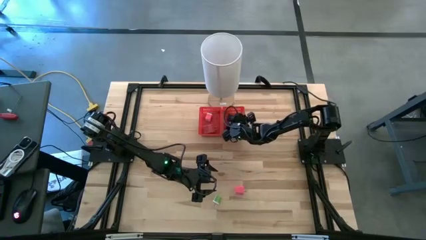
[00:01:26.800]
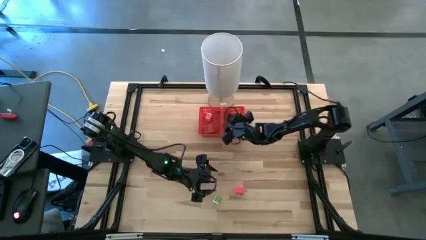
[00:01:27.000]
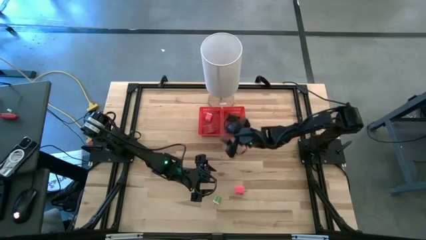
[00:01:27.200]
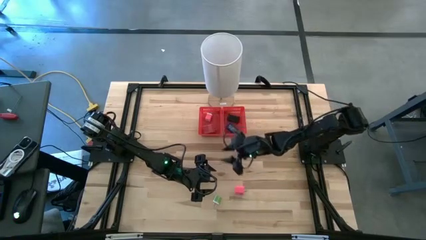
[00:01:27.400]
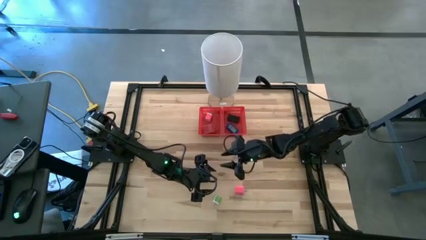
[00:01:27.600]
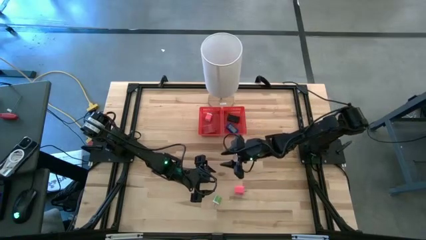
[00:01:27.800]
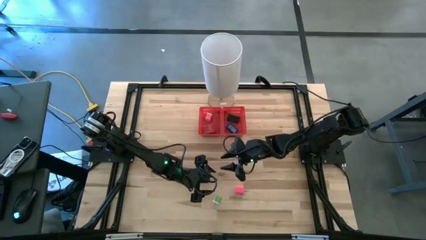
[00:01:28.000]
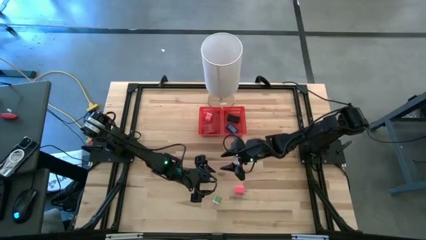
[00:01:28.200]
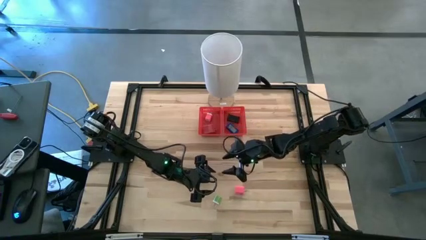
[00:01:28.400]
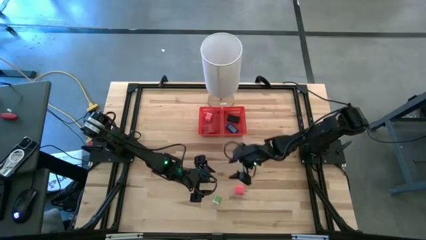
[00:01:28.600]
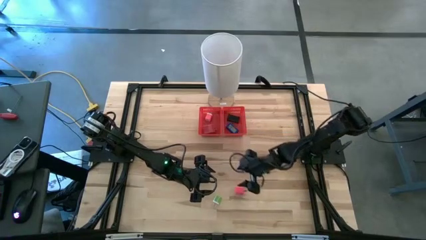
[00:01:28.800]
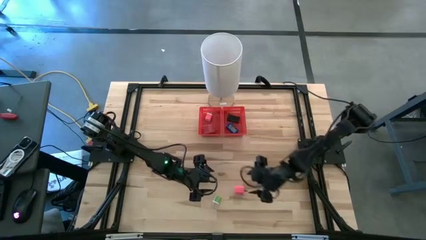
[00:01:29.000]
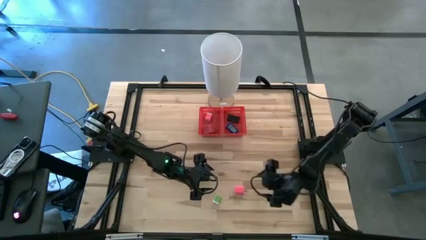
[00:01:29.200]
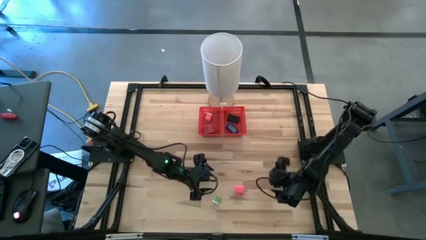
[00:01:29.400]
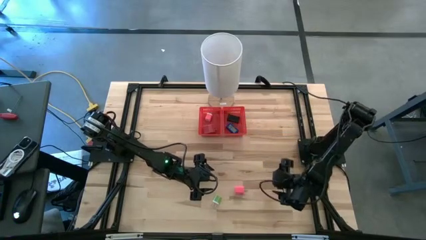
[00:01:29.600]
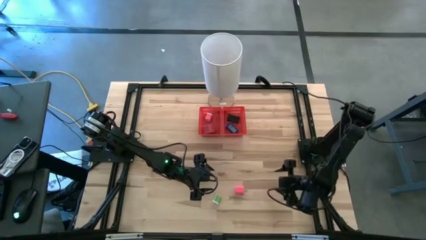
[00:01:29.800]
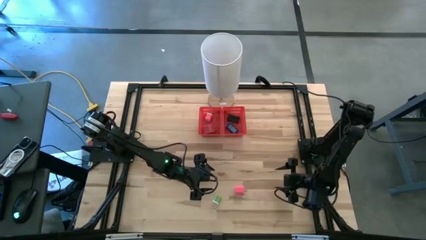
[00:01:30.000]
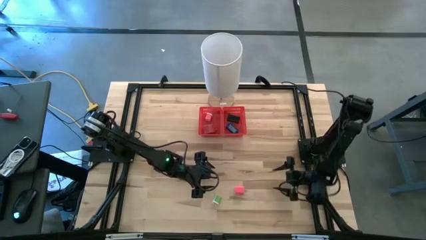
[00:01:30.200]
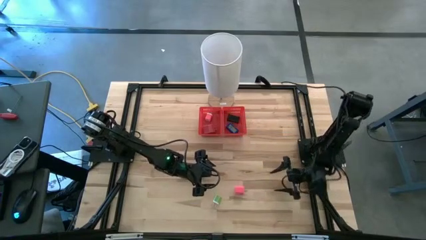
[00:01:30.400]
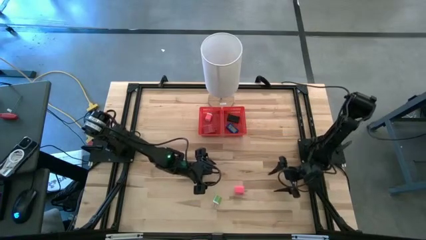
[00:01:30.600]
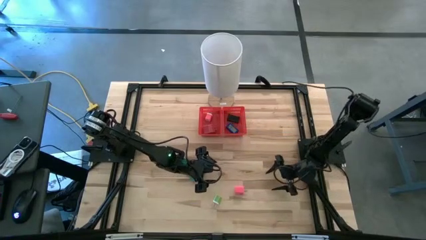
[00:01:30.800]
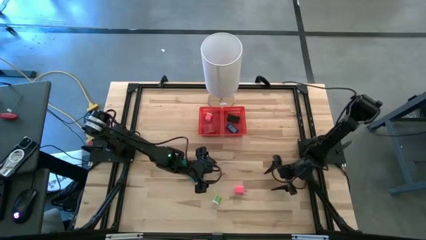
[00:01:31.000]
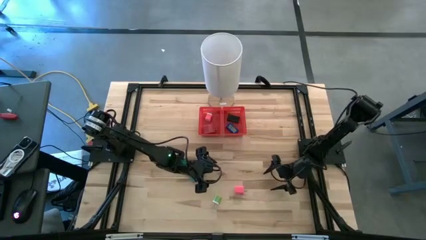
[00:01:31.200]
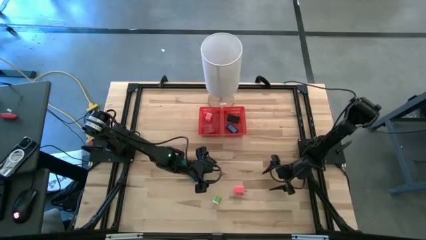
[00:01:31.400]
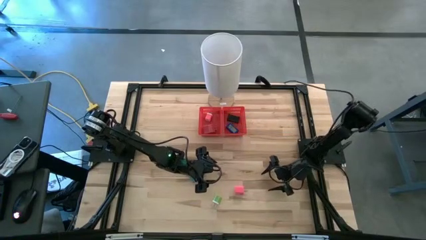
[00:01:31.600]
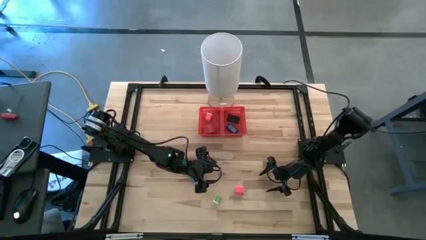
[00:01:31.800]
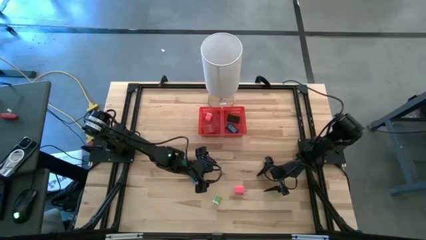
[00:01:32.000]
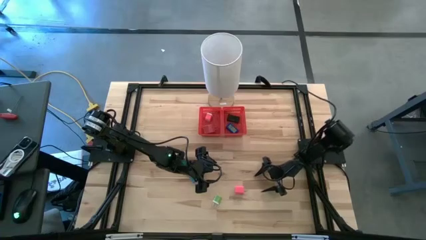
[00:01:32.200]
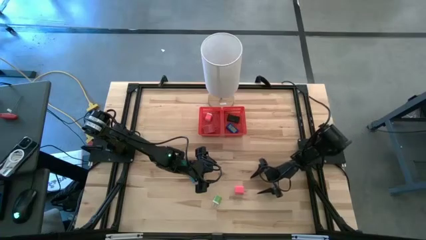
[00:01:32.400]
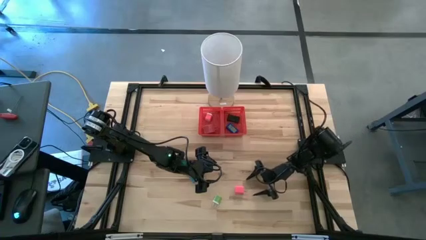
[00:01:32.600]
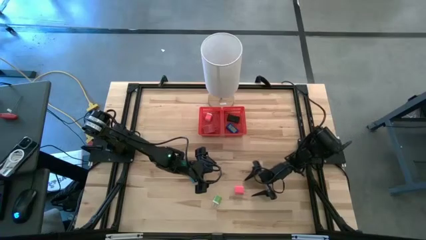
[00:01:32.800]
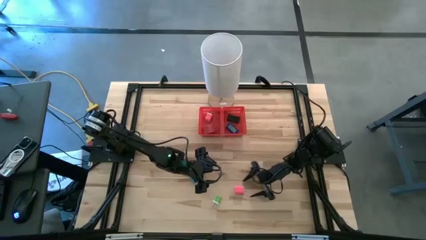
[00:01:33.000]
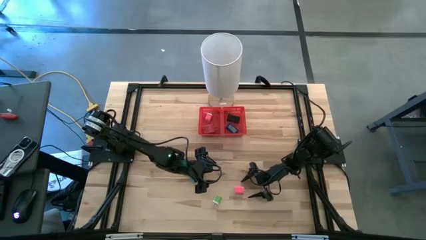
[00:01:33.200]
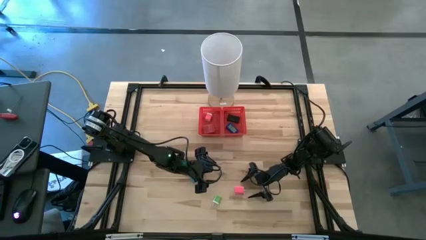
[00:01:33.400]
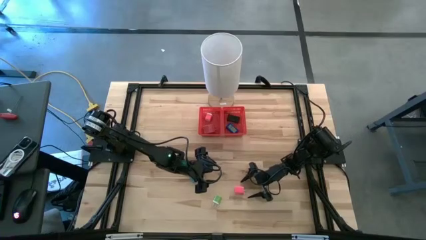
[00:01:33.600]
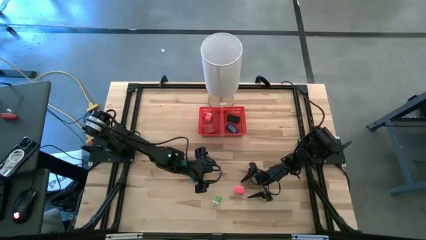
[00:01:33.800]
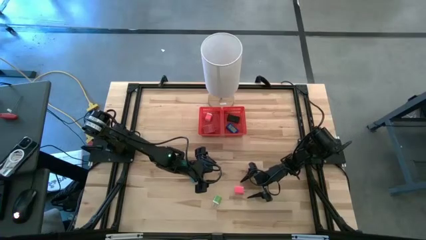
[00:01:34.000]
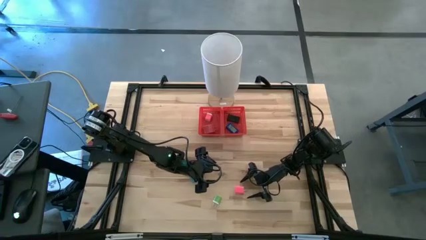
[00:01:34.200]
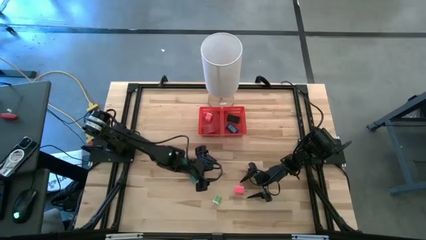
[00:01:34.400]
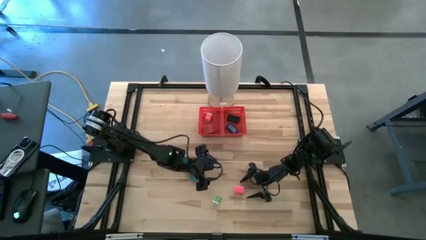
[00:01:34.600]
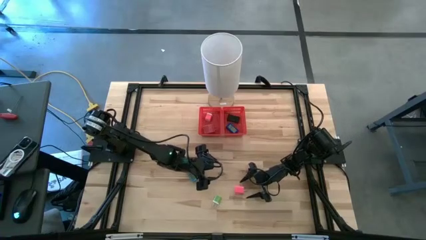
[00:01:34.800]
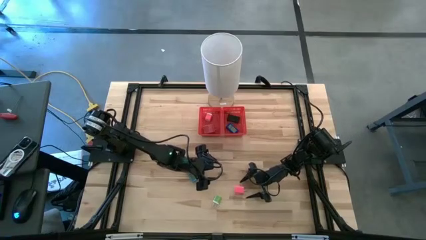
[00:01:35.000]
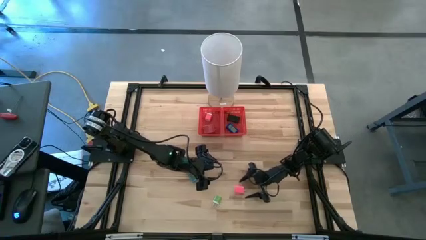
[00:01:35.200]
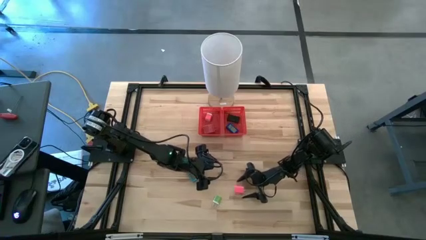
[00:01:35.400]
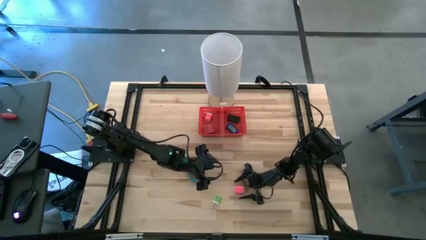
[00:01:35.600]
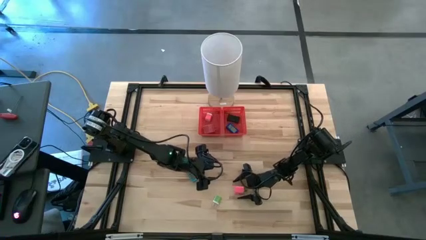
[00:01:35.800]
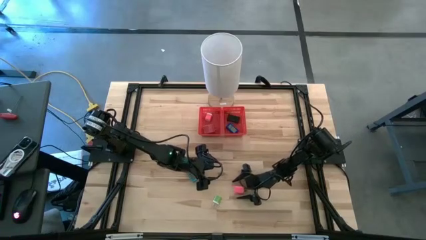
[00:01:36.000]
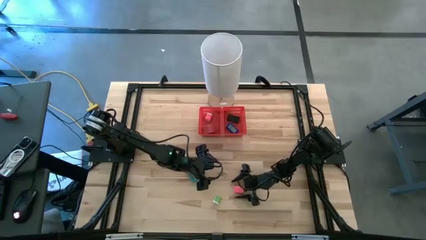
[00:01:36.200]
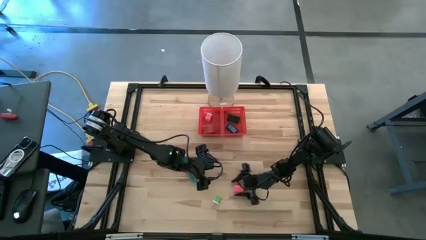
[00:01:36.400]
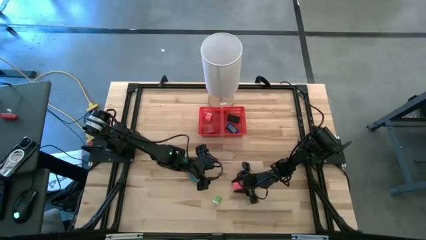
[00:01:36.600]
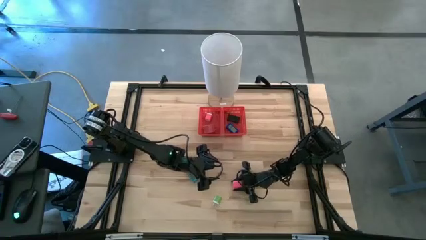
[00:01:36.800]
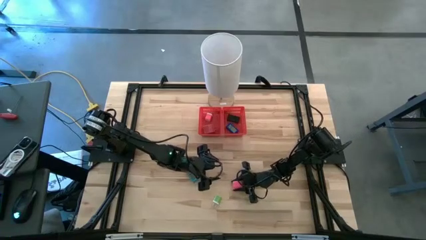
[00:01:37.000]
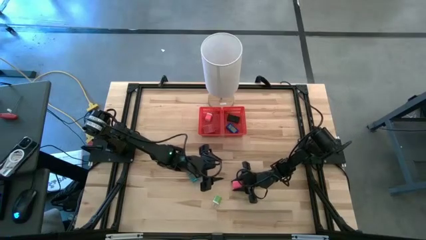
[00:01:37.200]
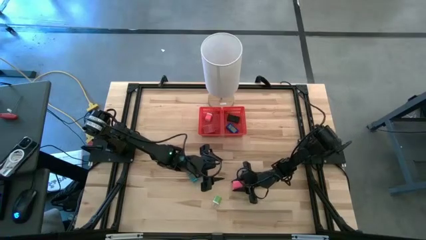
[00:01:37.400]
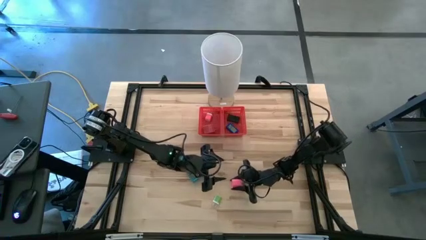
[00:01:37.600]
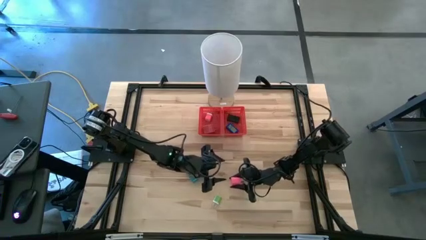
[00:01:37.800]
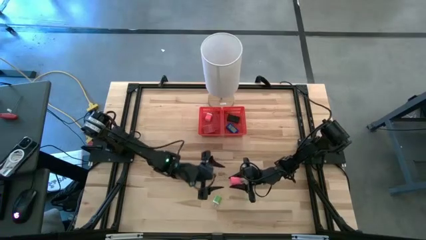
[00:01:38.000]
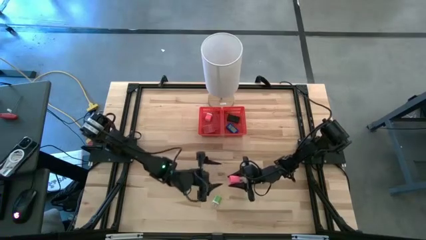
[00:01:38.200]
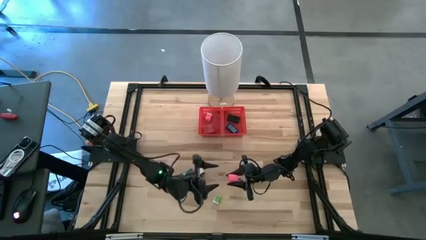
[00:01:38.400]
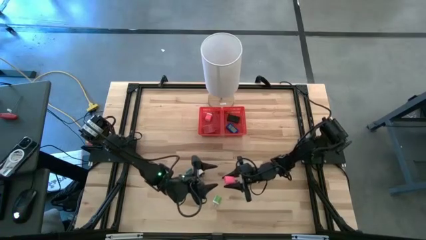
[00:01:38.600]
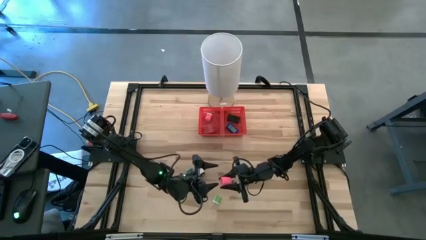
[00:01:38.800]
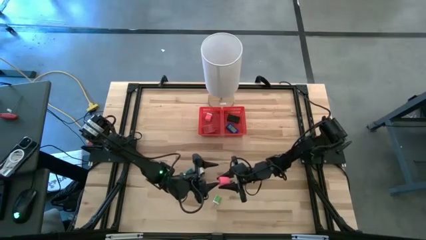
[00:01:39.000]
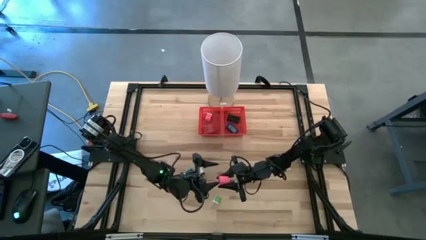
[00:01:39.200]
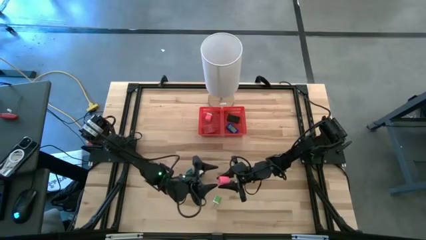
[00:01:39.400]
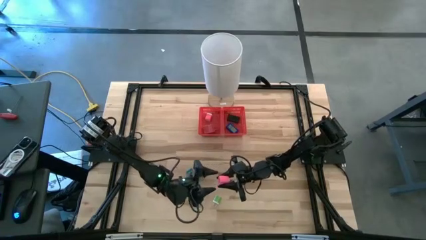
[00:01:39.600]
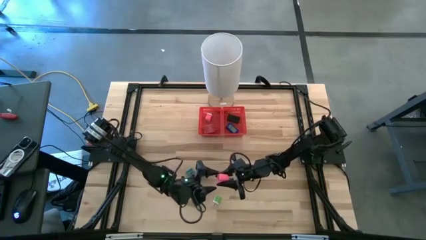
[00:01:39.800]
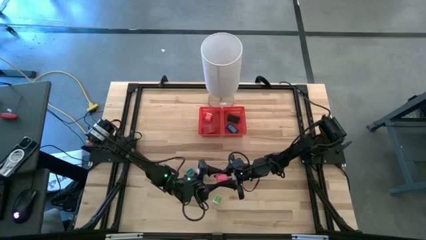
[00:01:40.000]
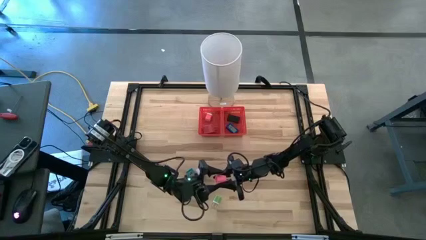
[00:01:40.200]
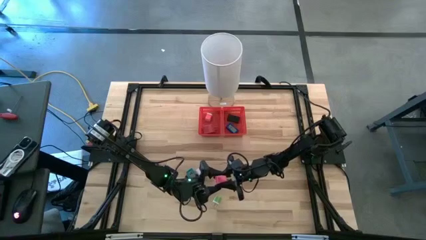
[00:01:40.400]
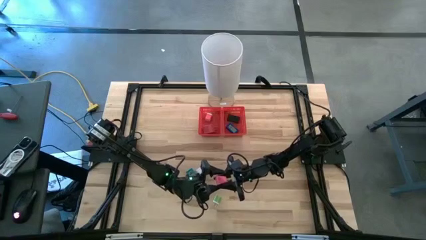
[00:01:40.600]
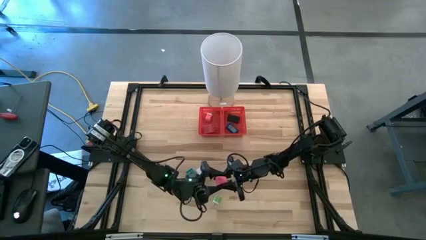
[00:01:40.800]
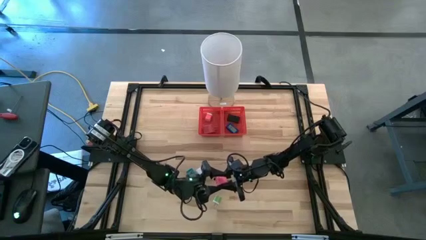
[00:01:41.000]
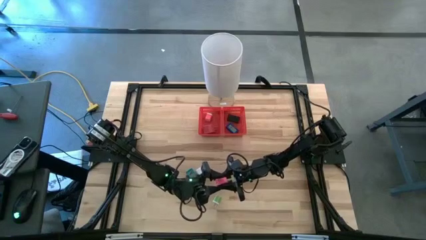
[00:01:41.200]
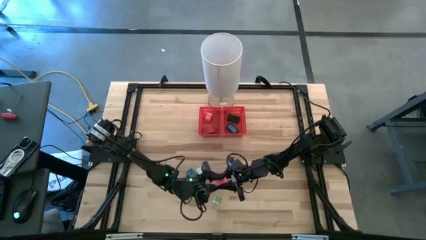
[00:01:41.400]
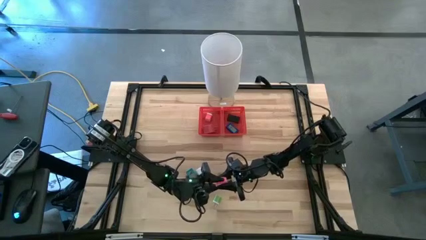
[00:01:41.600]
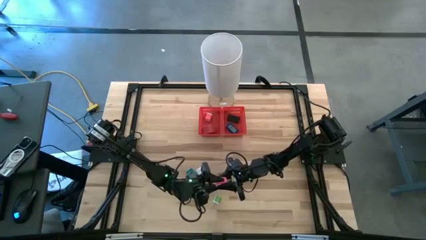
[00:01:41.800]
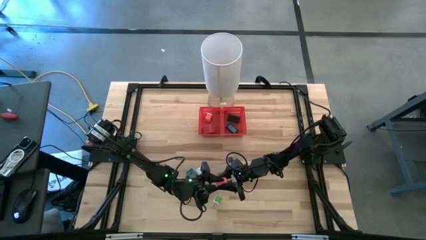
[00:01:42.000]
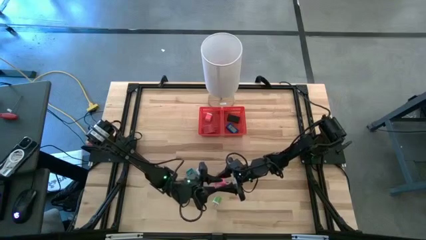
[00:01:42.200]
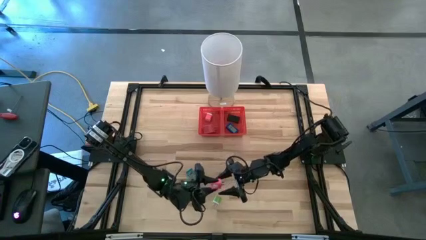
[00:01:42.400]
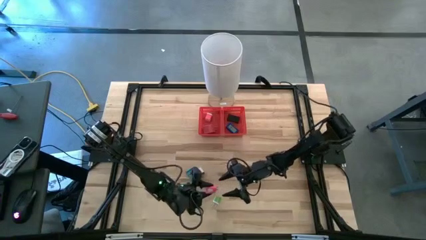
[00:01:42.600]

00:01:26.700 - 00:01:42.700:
Task: Pick & Place Office items
Put the pink charger adapter into the left red bin
